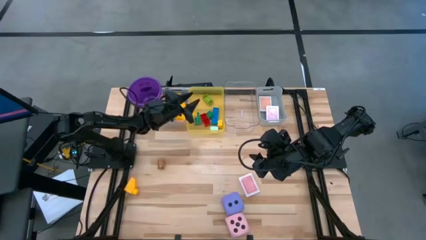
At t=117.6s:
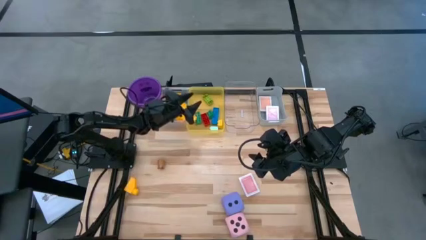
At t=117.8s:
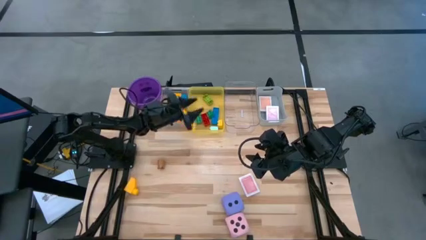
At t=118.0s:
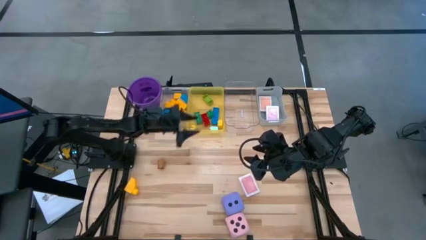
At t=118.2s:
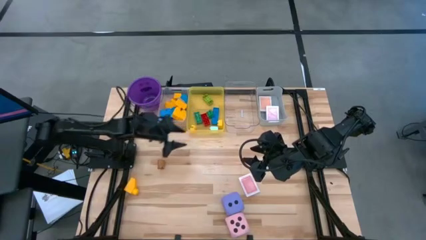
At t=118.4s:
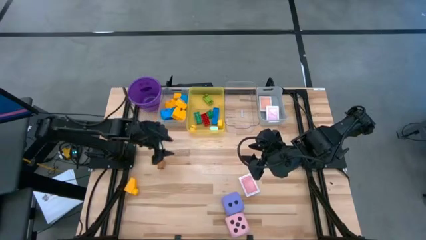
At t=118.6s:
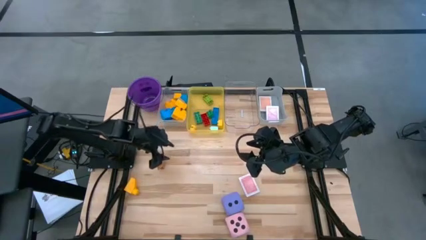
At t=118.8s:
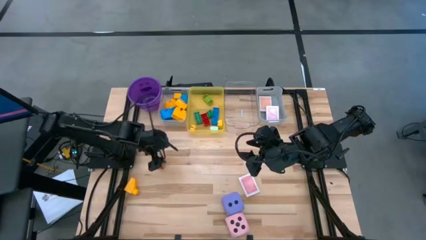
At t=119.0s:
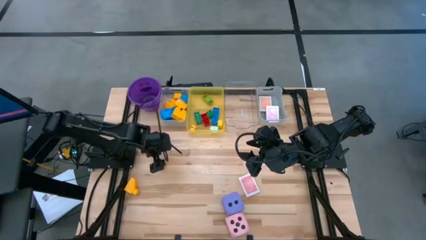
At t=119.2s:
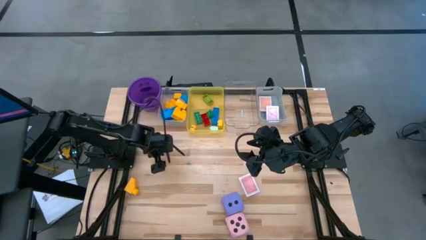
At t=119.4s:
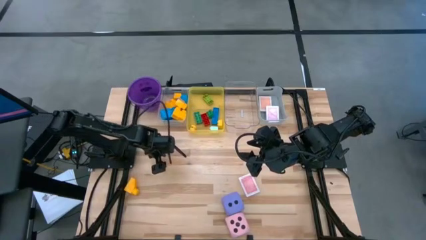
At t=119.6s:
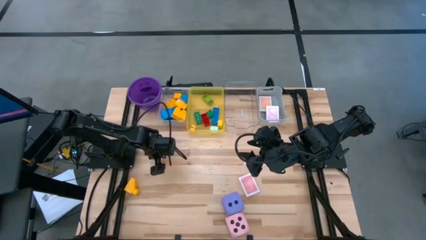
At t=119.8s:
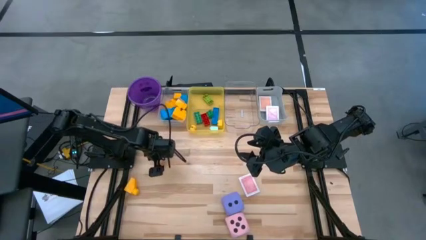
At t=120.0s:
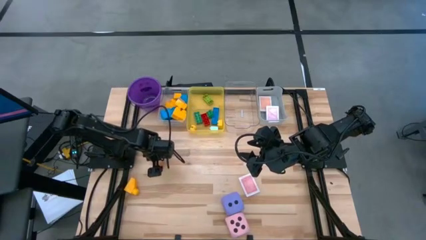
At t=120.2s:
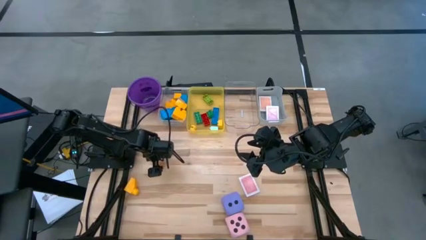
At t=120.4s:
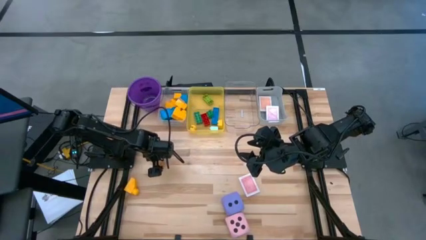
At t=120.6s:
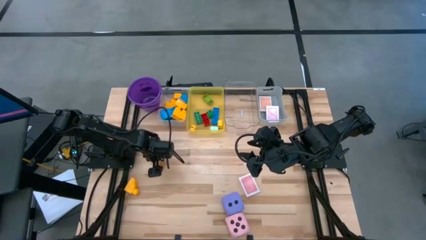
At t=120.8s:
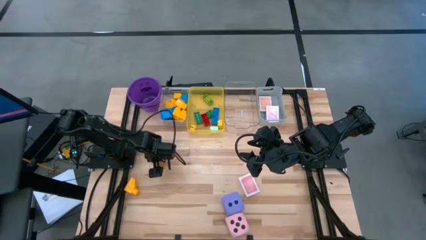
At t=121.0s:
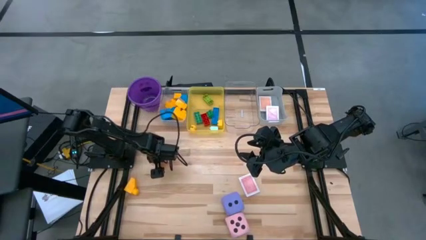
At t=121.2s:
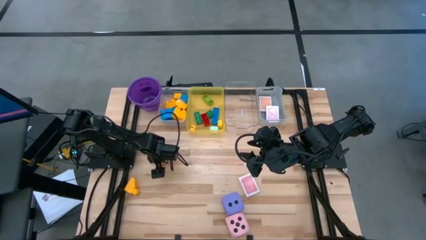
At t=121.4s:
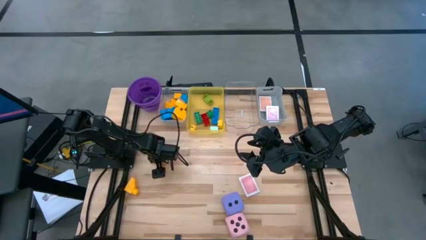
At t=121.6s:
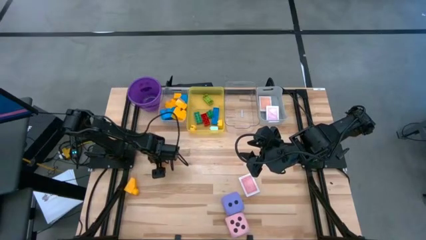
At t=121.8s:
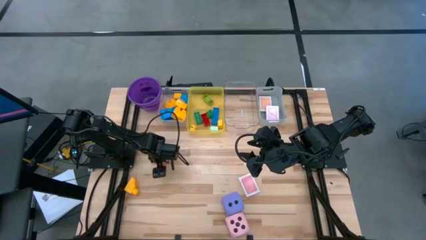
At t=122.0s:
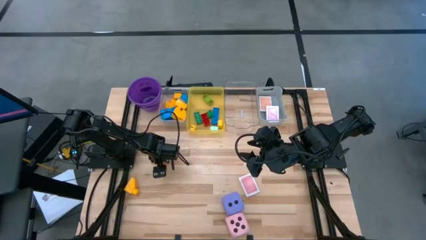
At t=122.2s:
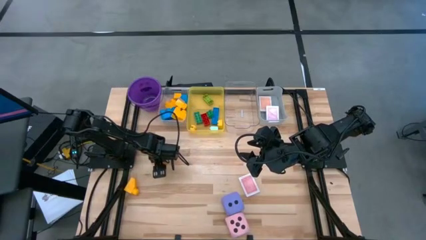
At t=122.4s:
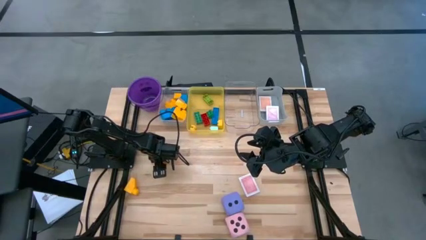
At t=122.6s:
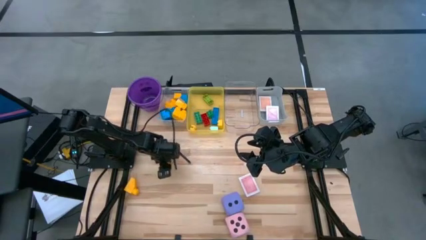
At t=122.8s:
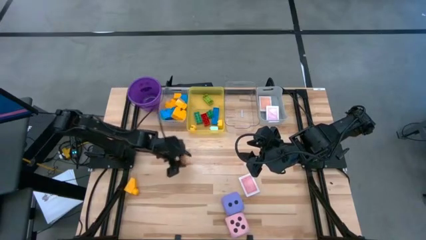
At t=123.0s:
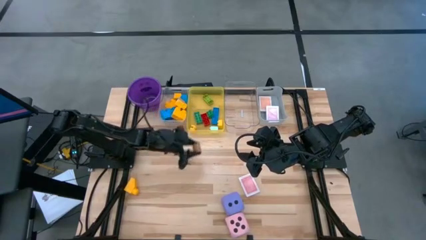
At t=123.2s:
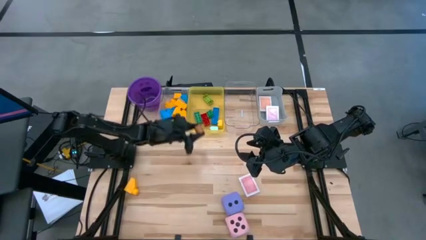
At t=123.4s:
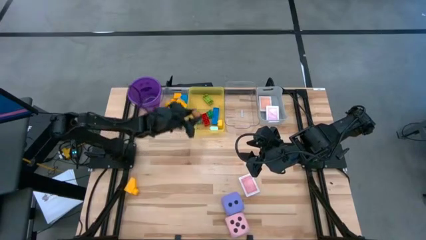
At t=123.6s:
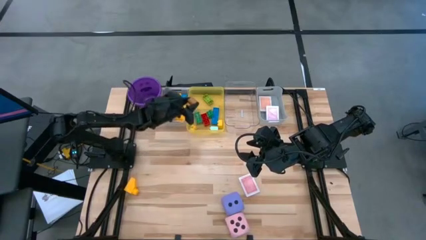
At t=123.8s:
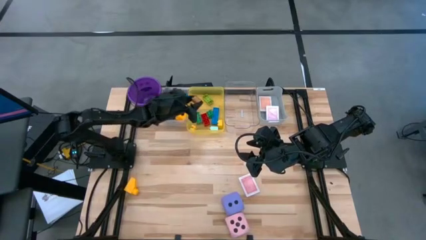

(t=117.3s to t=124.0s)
Task: Pick & Place Toys
Put the small brown game piece into the yellow bin

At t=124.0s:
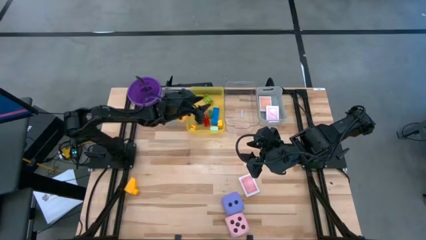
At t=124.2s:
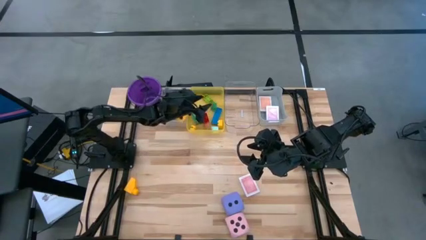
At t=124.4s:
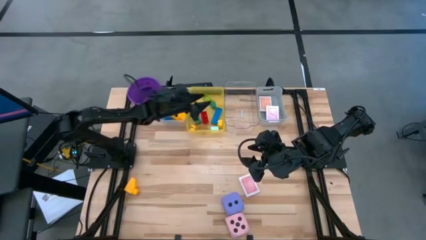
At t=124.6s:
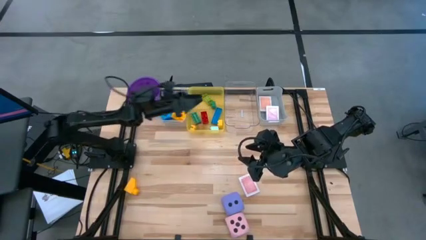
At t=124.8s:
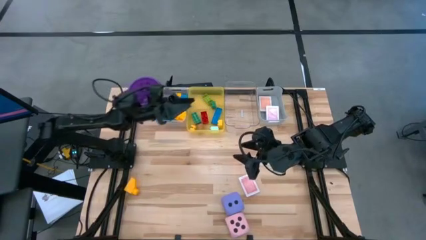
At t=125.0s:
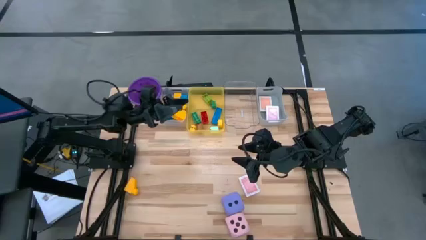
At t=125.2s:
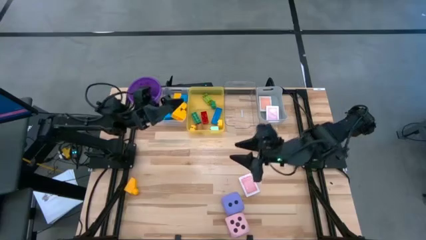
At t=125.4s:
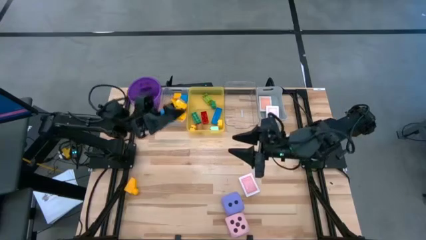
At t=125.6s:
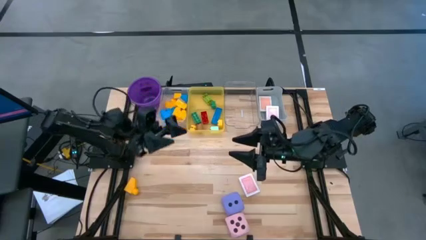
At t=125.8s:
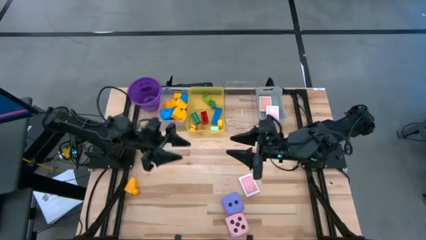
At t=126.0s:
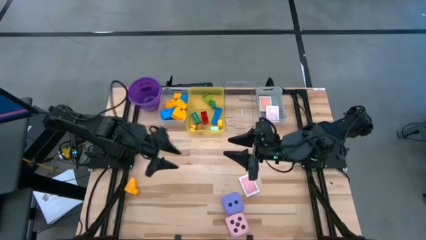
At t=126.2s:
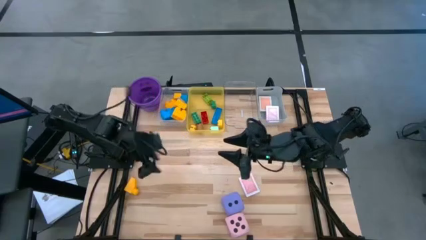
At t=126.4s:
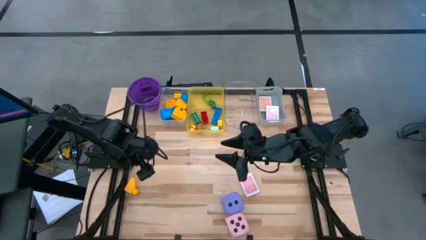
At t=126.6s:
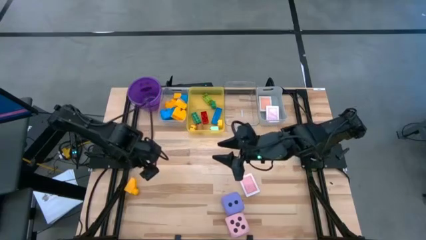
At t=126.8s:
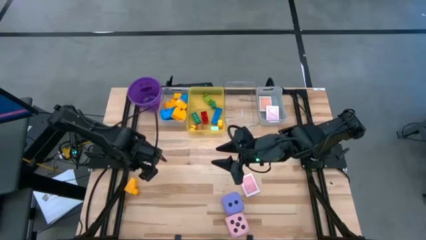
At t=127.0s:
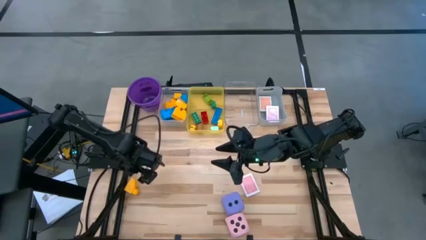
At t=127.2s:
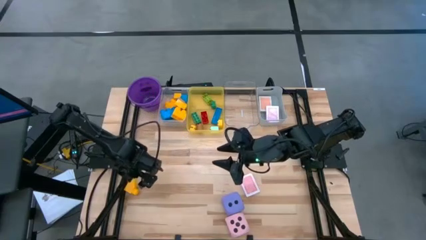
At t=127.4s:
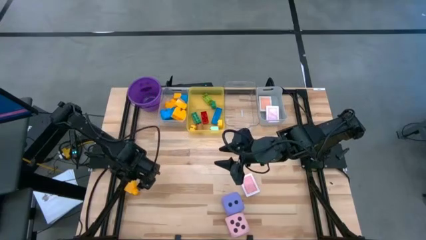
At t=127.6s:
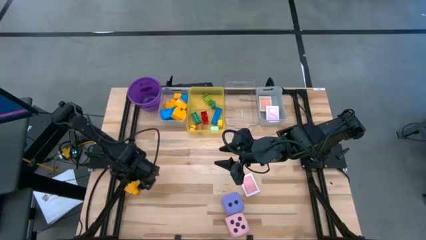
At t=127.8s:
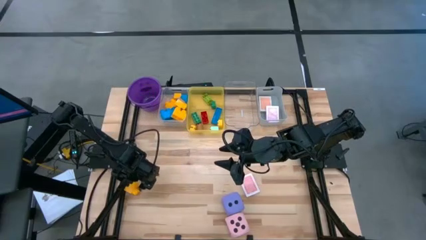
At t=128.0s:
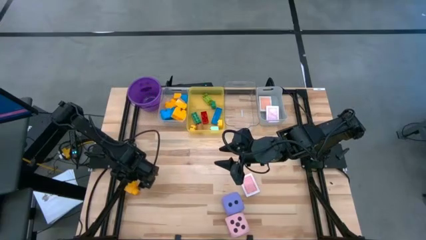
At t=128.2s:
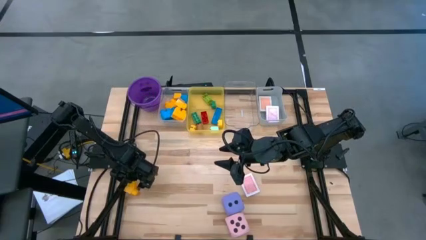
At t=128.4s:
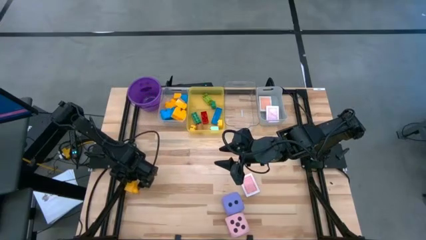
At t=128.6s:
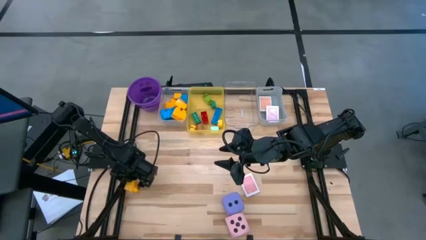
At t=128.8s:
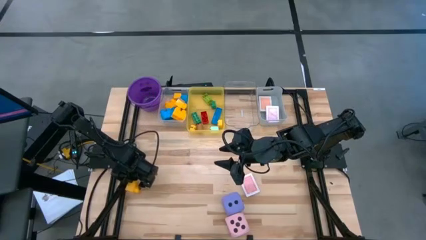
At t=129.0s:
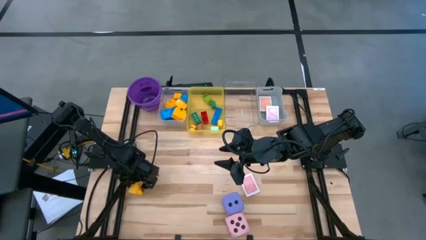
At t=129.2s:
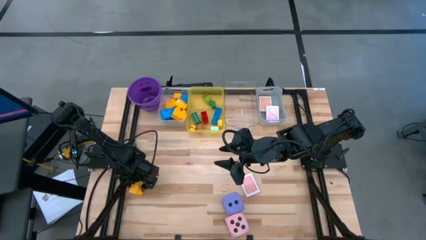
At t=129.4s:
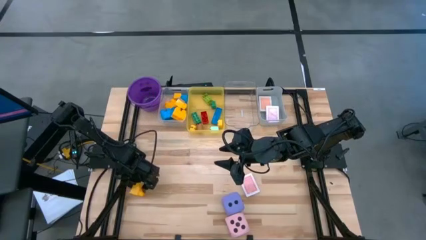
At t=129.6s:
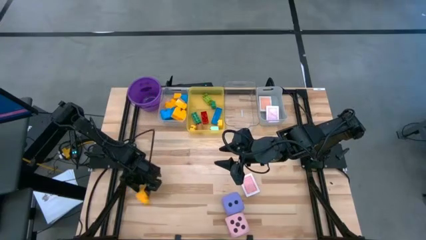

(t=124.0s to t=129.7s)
Put the big yellow game piece into the white bin

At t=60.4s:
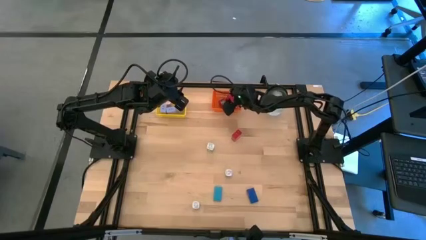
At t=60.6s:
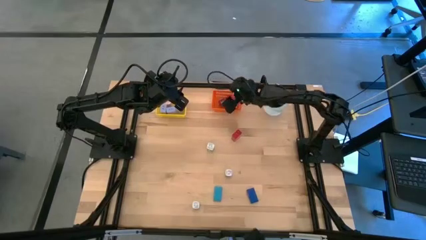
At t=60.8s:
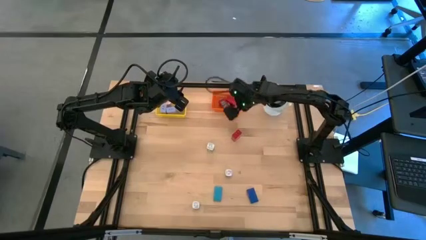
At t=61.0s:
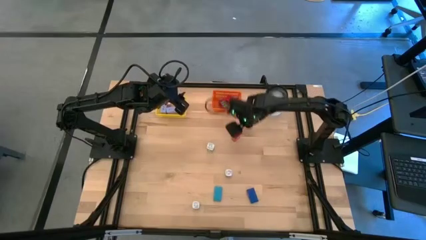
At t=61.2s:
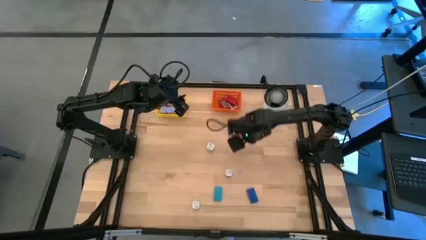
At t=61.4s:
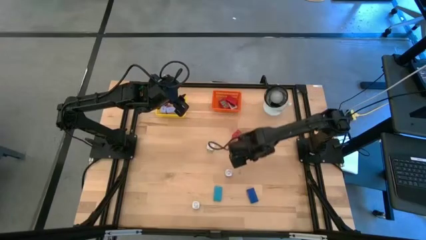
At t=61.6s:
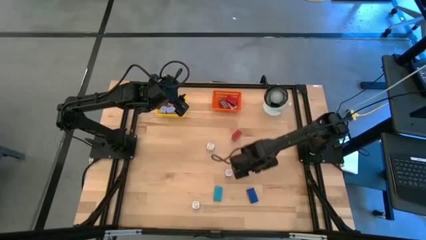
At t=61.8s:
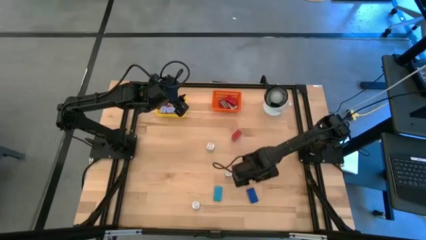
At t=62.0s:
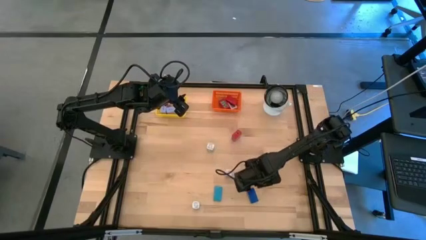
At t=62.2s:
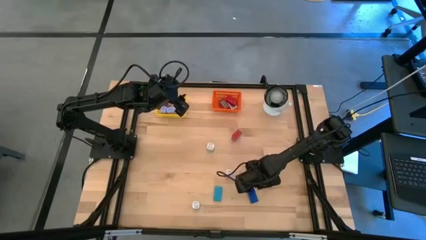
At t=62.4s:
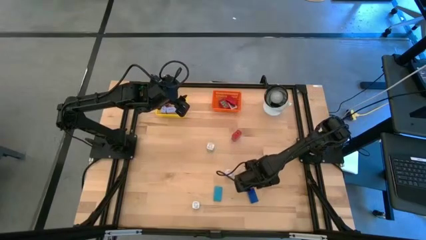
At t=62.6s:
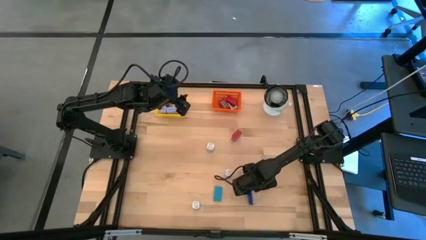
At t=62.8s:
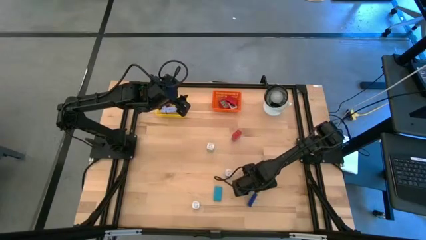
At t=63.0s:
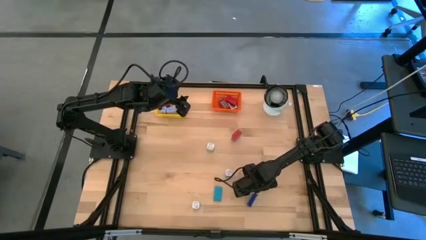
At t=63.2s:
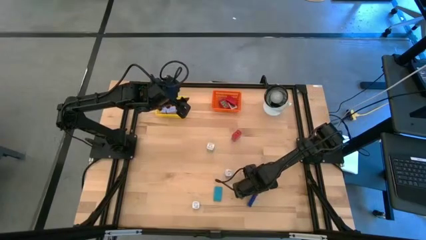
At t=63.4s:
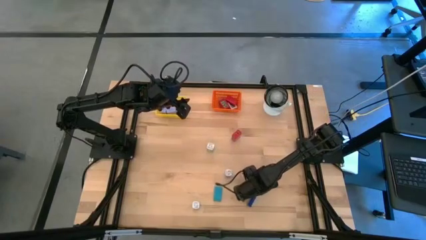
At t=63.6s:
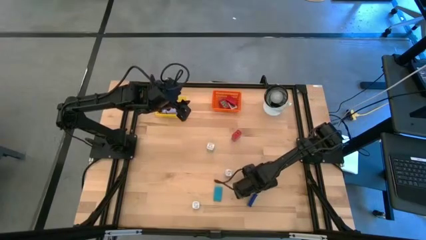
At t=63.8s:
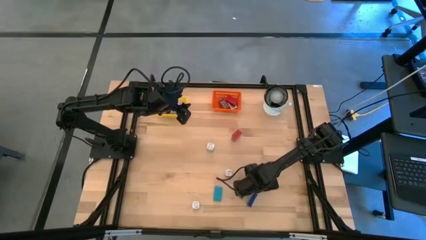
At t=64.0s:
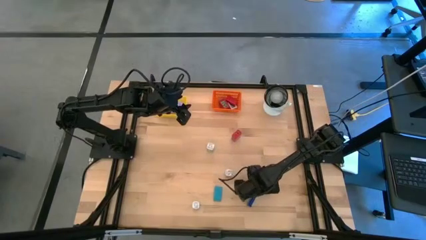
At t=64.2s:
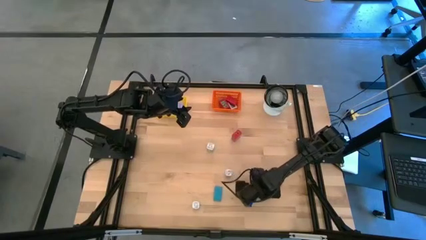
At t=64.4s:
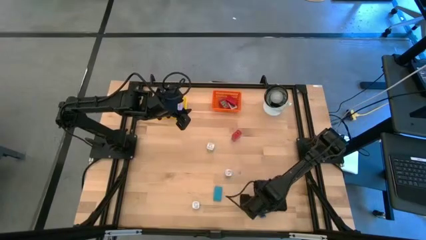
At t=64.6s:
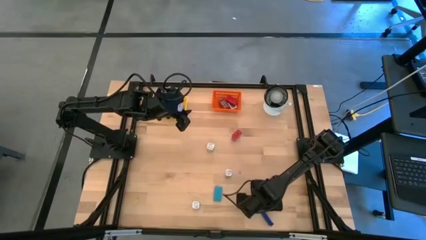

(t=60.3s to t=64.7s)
Task: Pick & Place Office items
Put the dark blue digital timer into the orange bin
